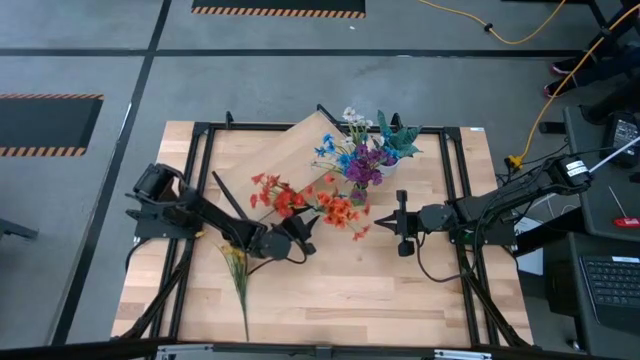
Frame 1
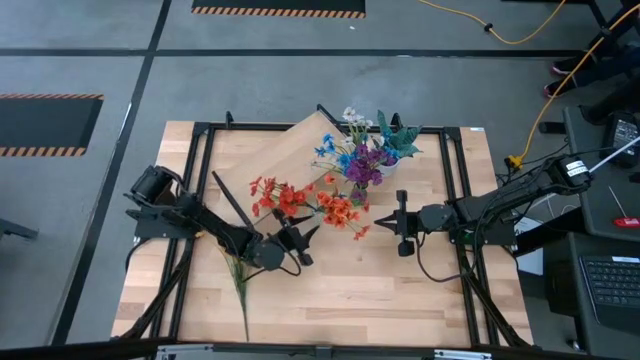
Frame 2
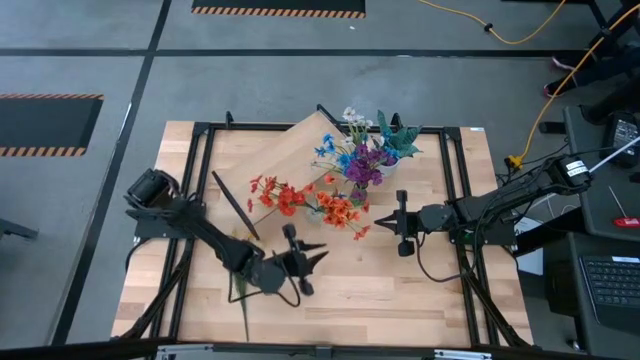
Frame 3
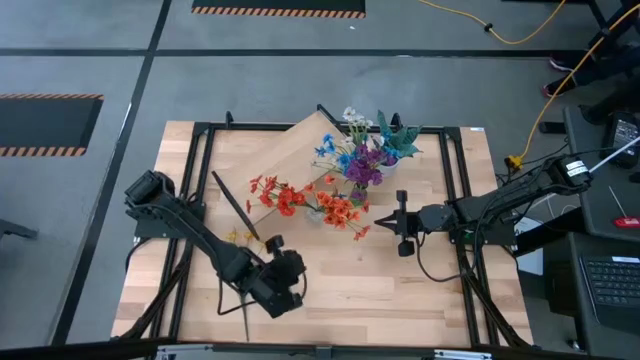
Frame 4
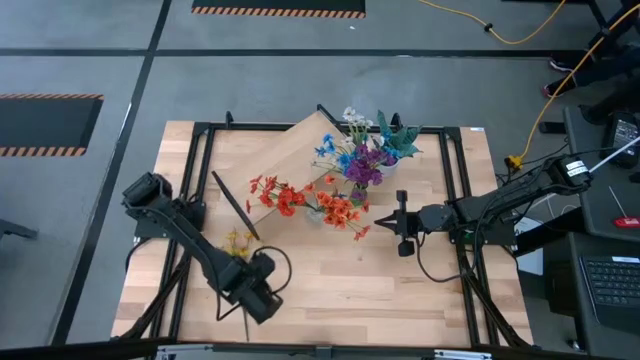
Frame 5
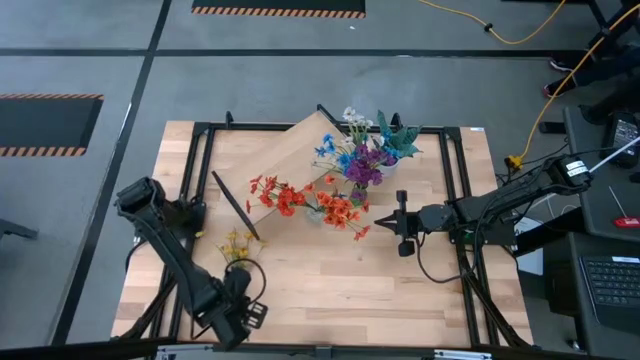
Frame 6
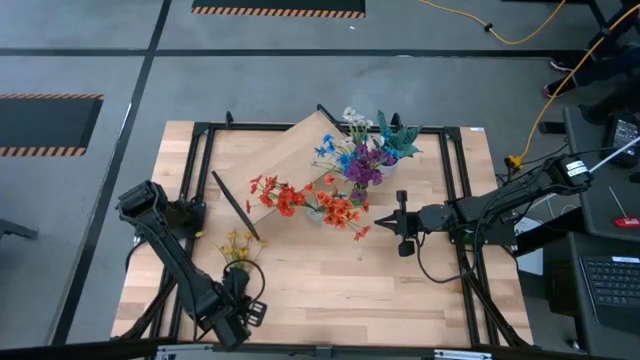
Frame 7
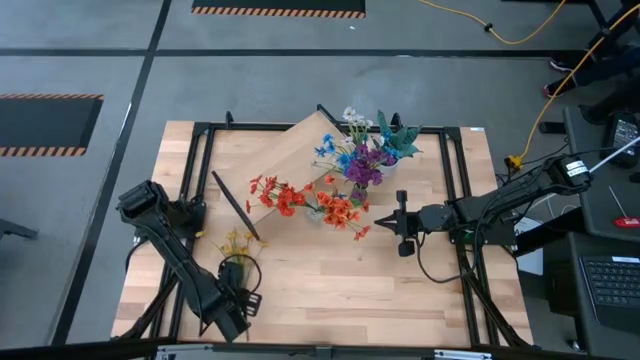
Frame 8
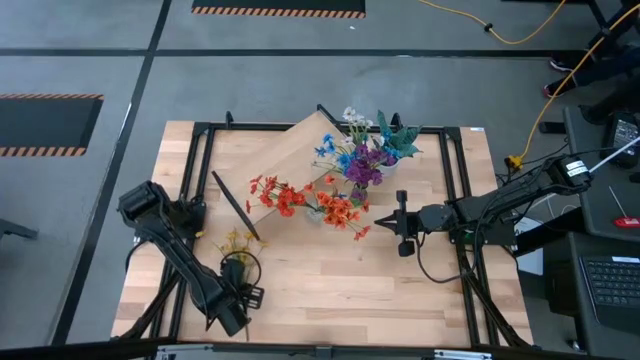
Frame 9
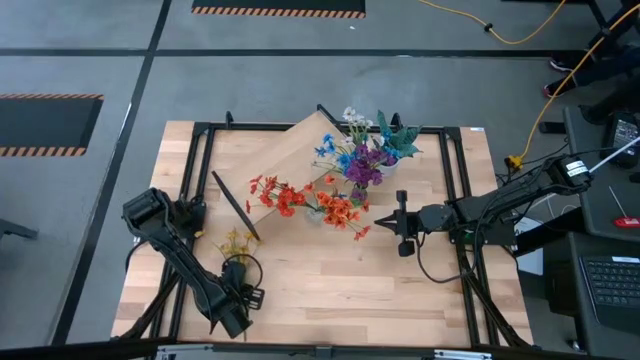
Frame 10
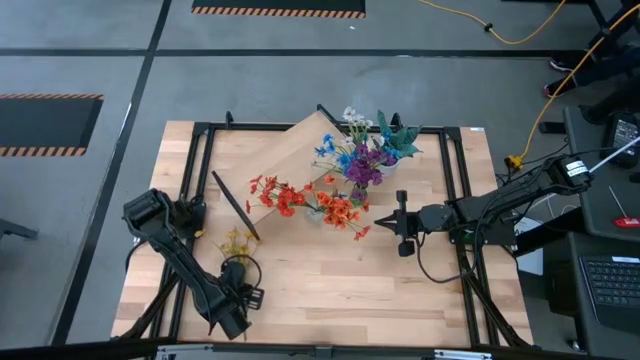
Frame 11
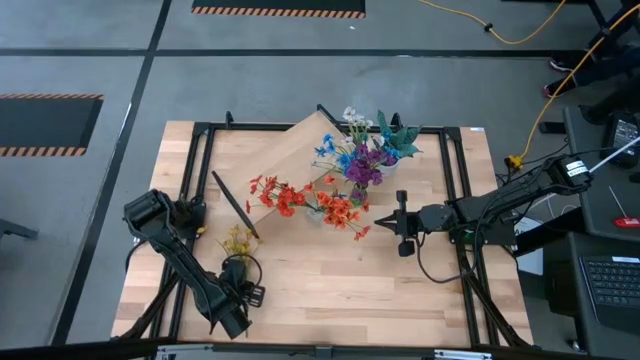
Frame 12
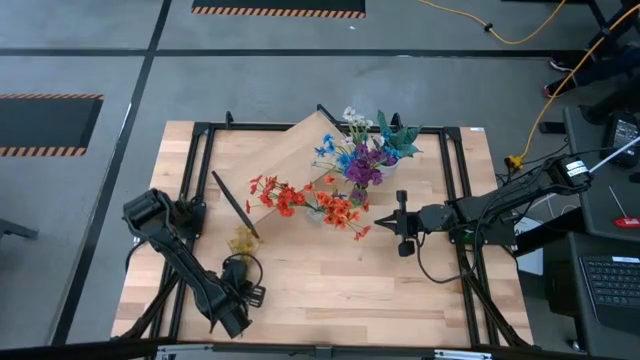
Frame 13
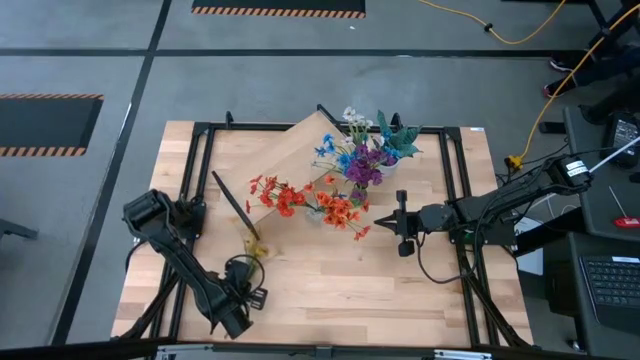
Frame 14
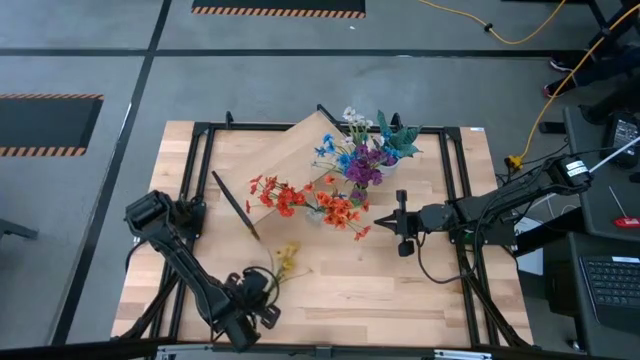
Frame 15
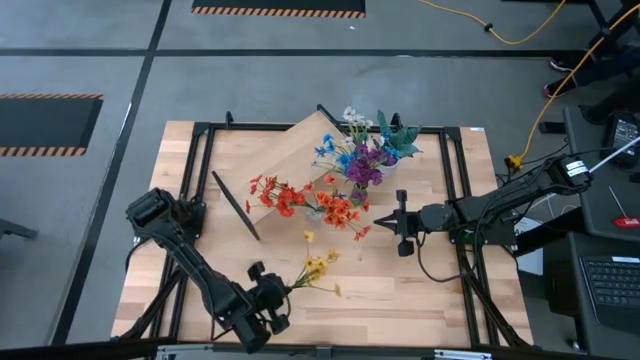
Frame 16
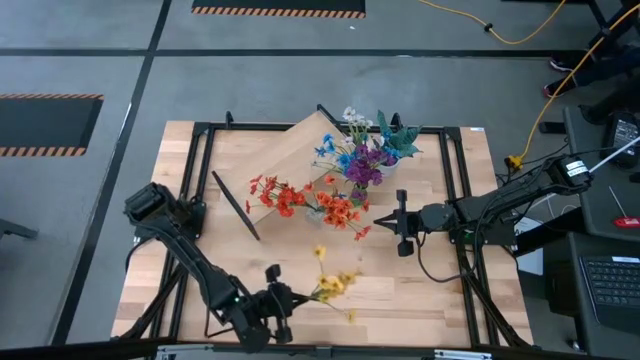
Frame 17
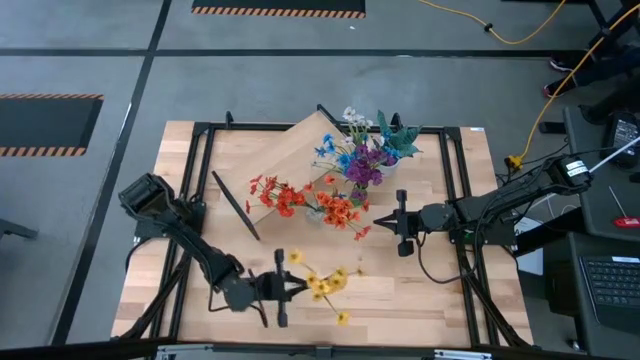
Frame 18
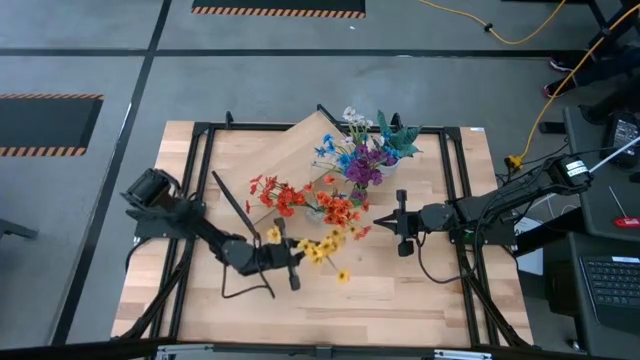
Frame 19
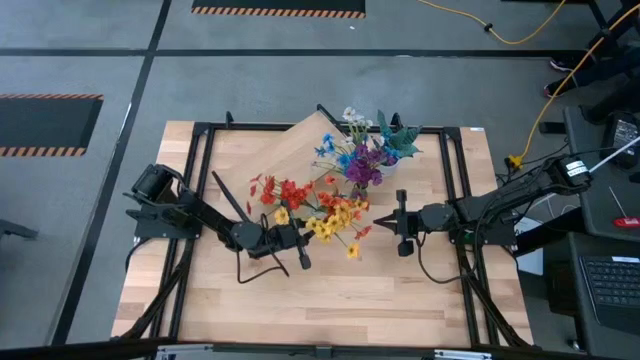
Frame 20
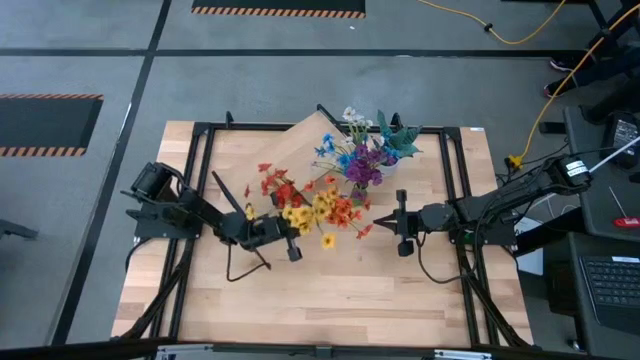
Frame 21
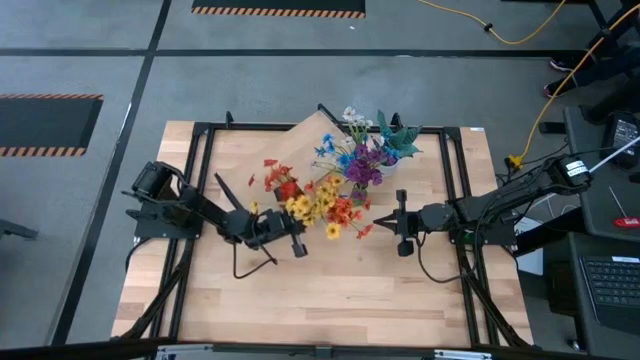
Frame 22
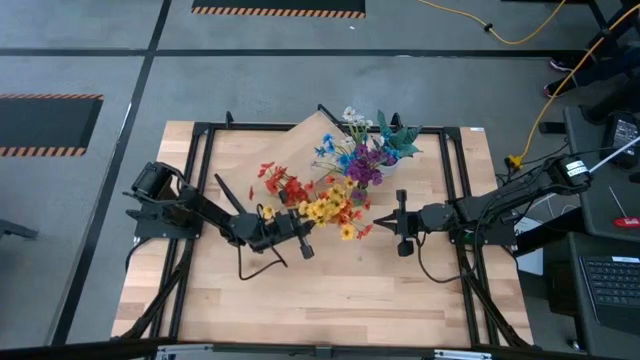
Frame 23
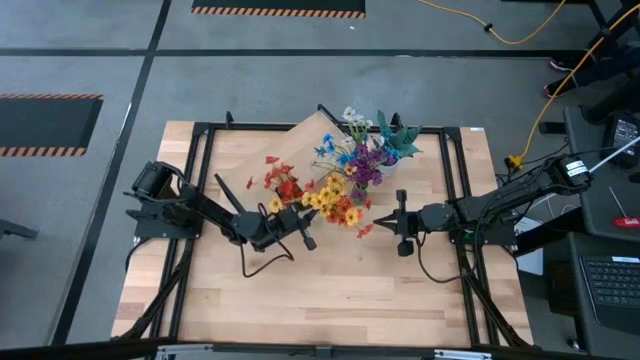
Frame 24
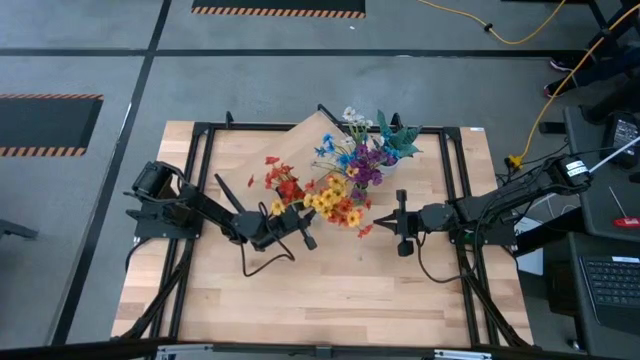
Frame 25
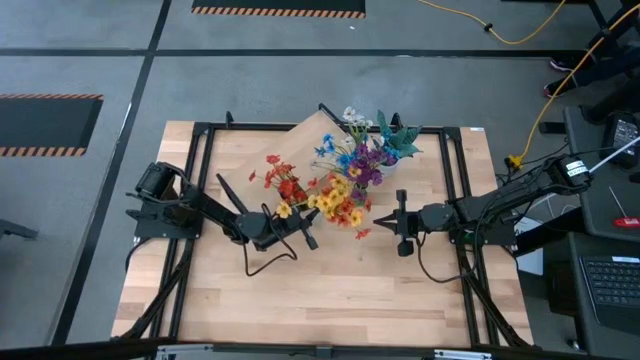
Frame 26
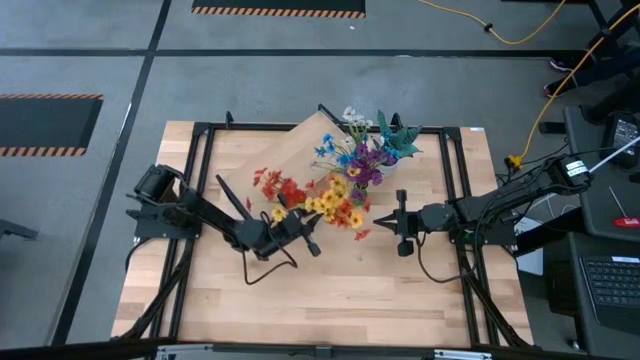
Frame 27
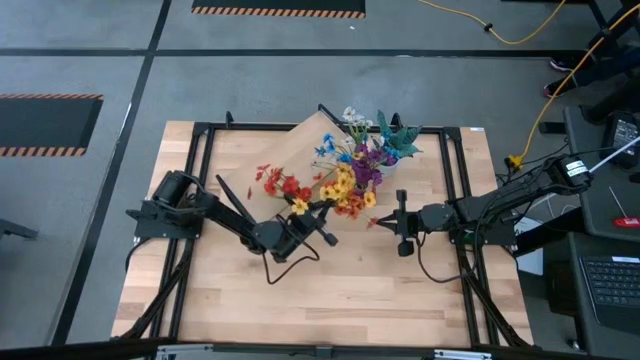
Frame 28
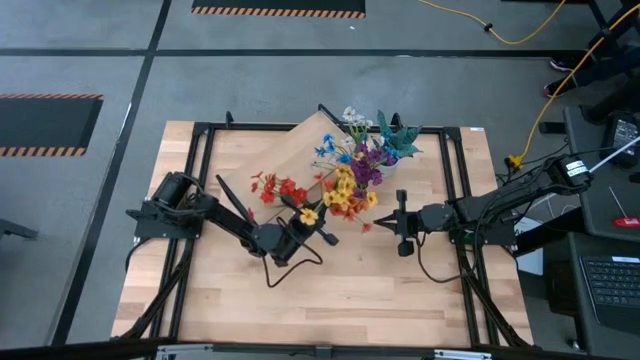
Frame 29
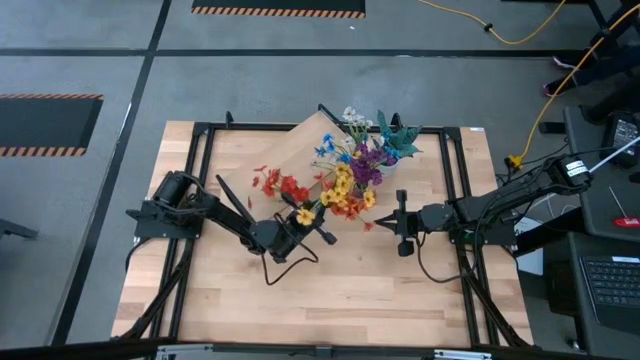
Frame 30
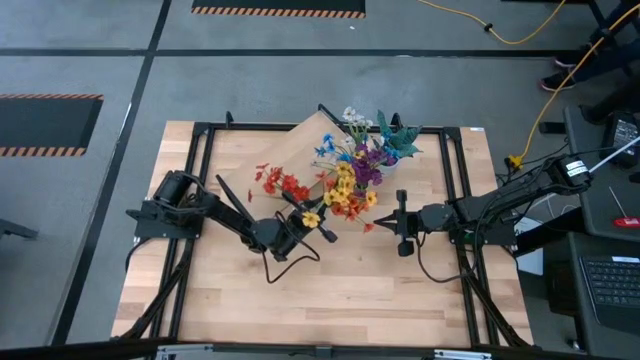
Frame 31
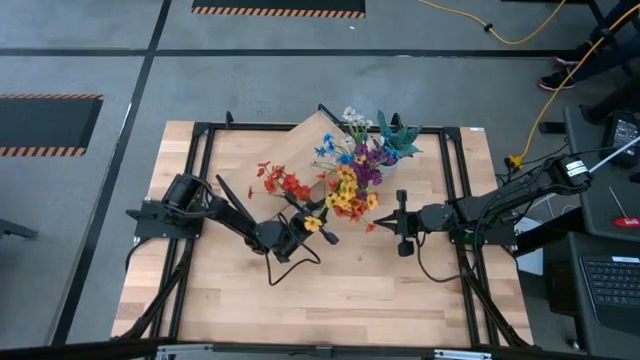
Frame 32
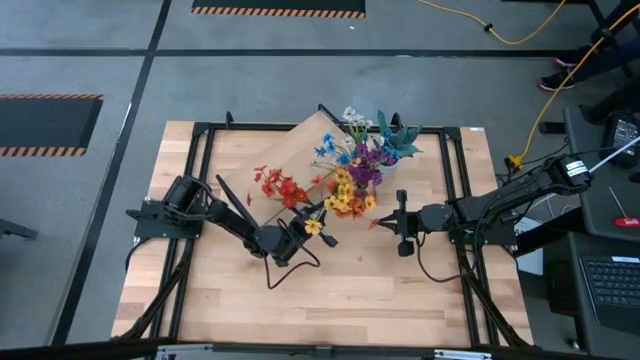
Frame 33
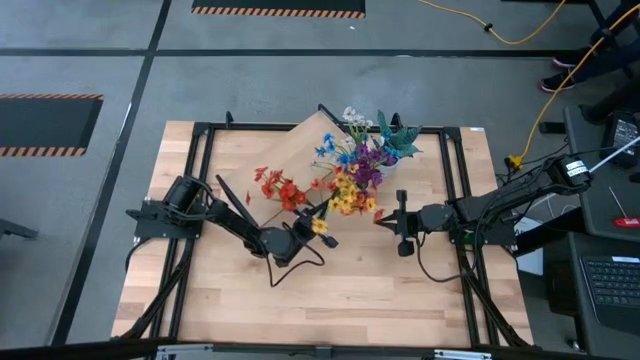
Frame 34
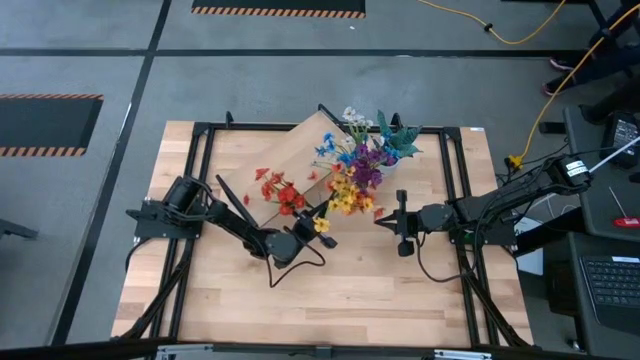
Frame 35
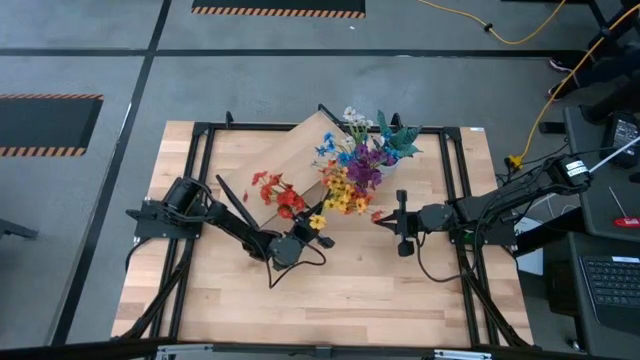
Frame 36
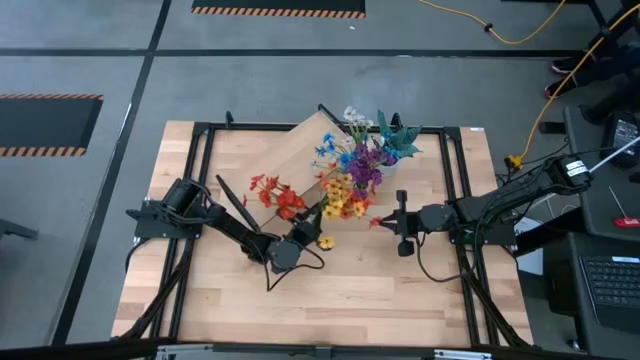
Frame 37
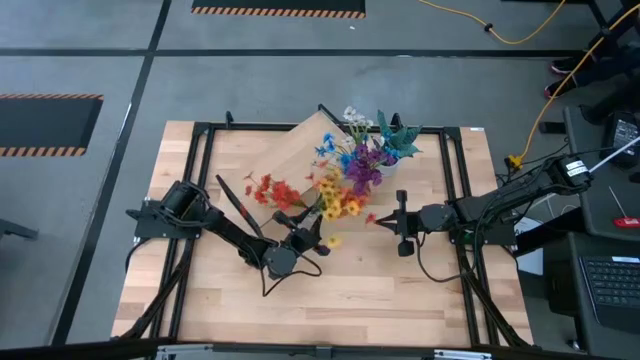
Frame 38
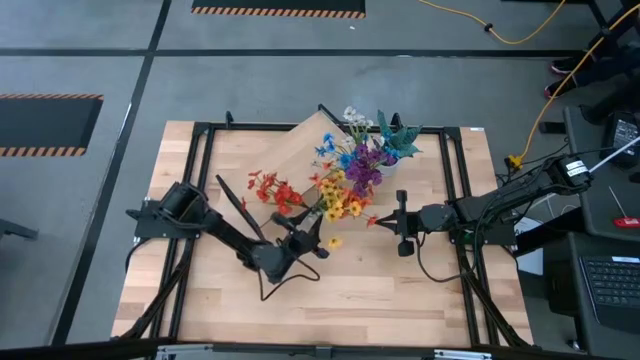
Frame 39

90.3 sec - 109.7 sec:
Task: Pick and place flowers into a vace then onto a shelf
Put the yellow flowers into the transparent vase

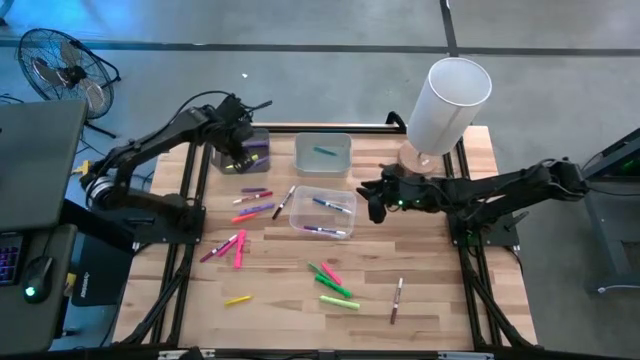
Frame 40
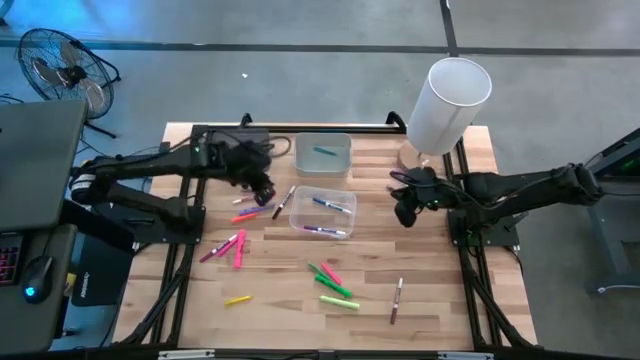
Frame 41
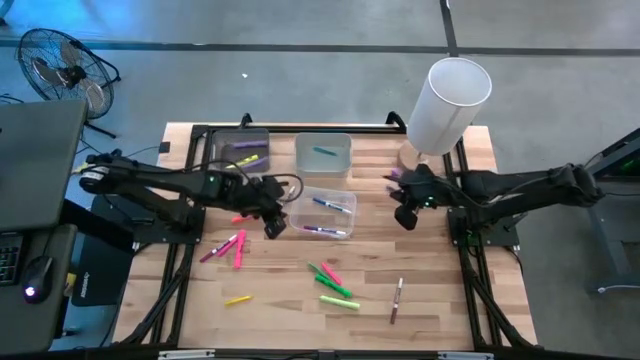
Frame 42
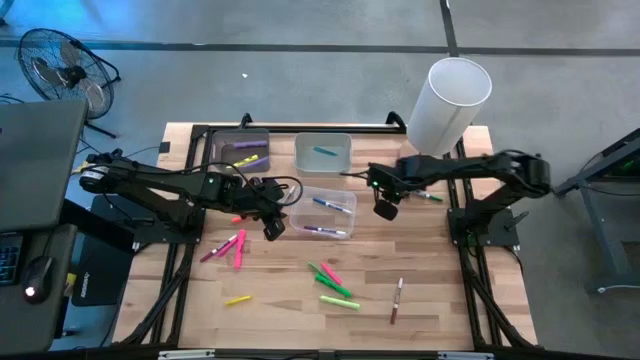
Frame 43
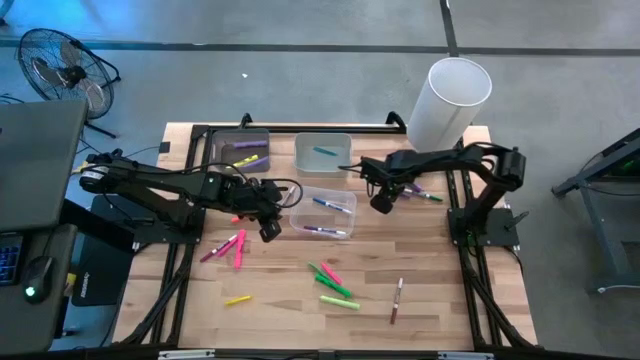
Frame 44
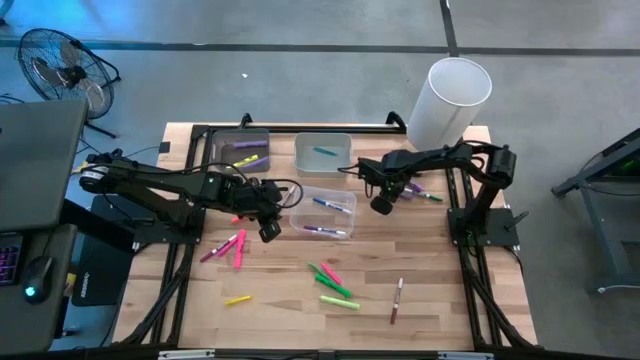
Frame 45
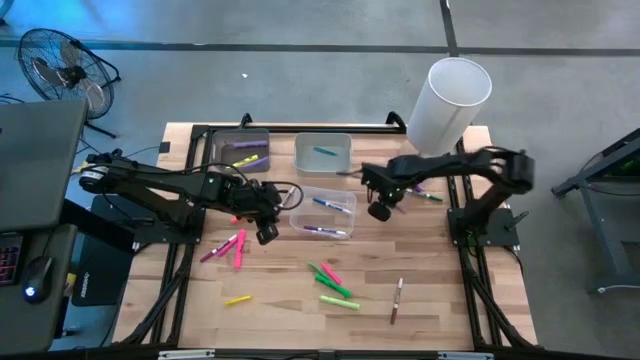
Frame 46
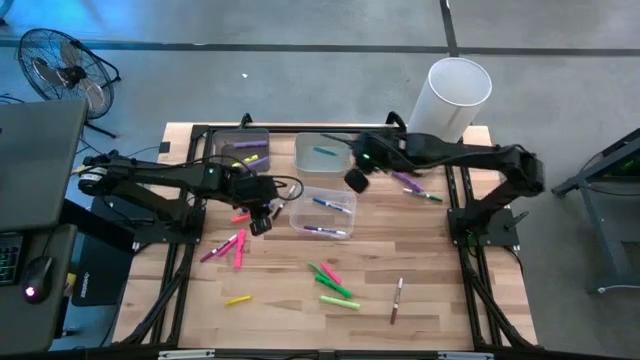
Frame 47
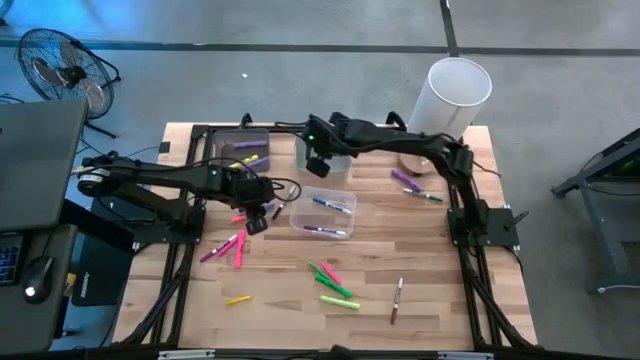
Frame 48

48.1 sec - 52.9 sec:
Task: Pick & Place Markers
Put the right purple pen into the gray bin
